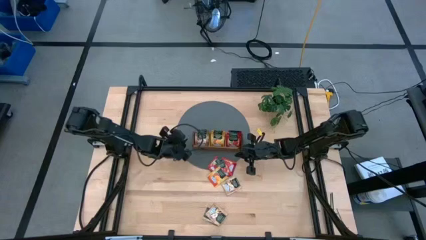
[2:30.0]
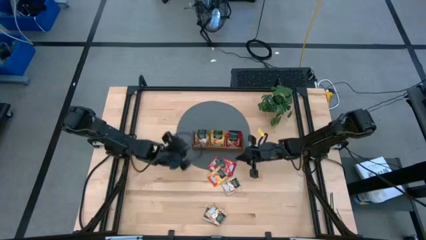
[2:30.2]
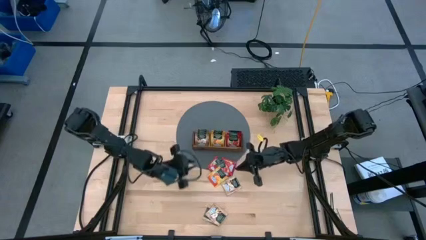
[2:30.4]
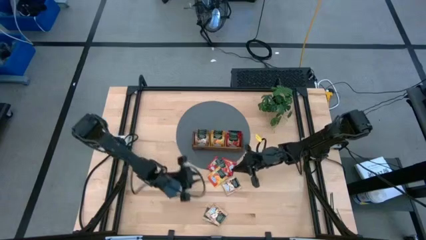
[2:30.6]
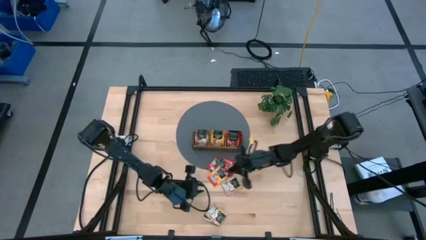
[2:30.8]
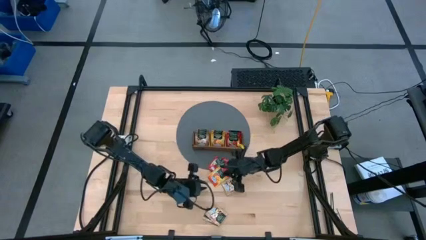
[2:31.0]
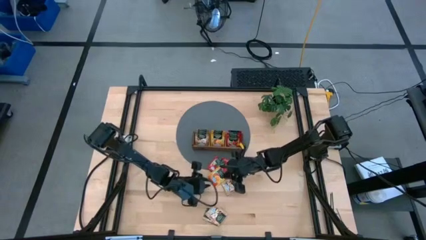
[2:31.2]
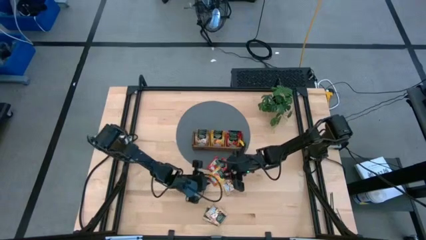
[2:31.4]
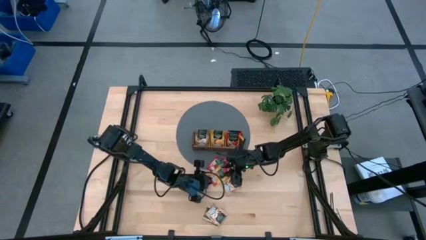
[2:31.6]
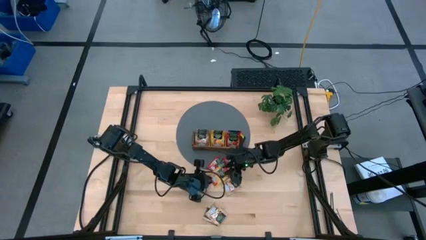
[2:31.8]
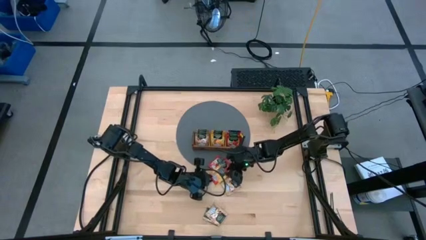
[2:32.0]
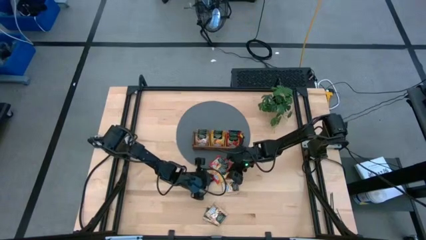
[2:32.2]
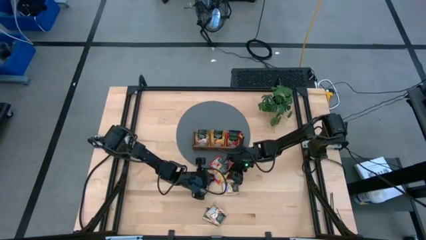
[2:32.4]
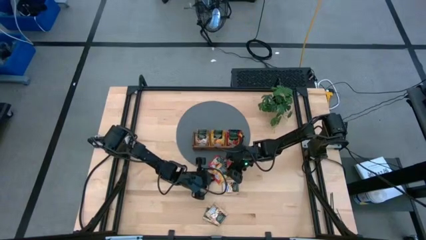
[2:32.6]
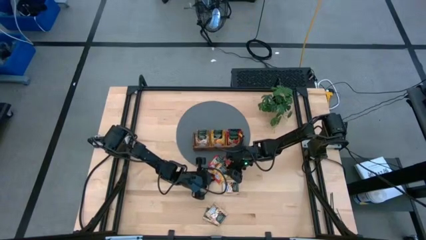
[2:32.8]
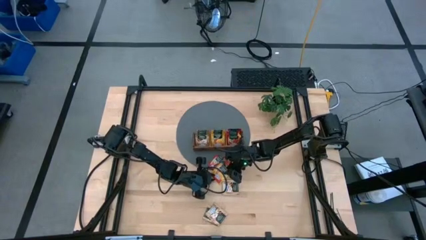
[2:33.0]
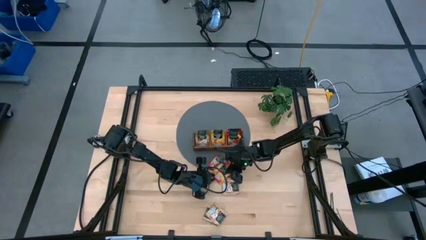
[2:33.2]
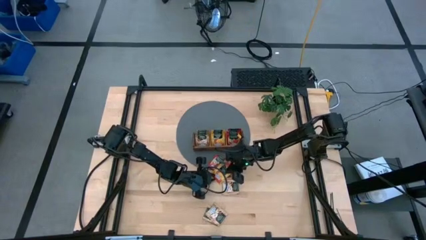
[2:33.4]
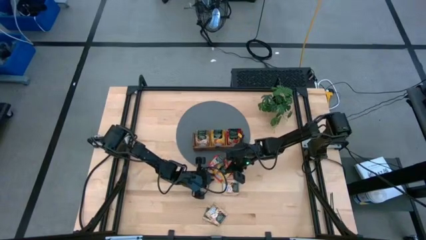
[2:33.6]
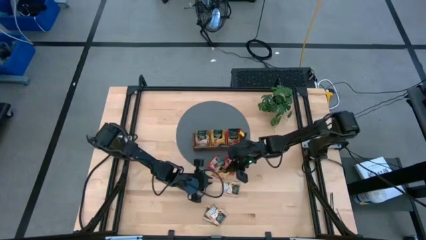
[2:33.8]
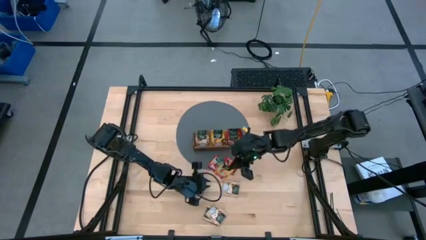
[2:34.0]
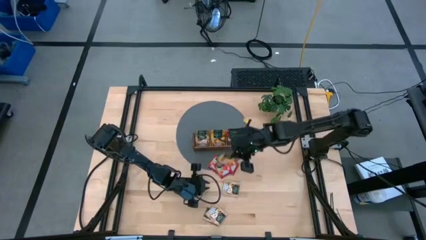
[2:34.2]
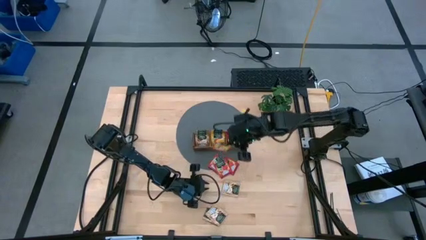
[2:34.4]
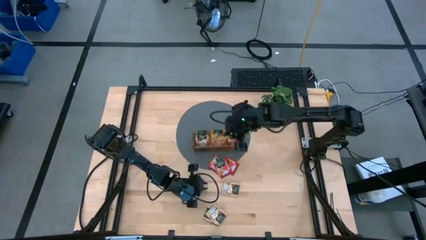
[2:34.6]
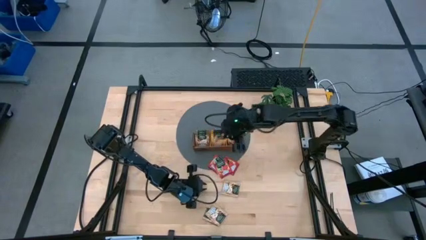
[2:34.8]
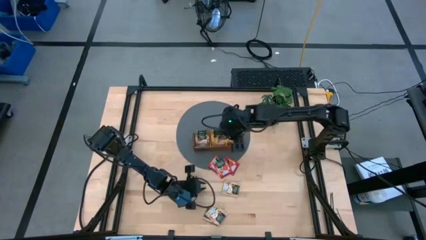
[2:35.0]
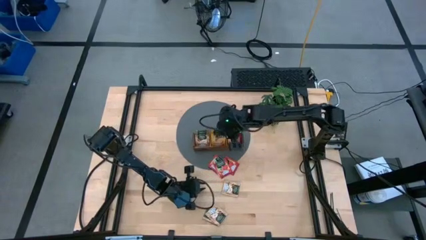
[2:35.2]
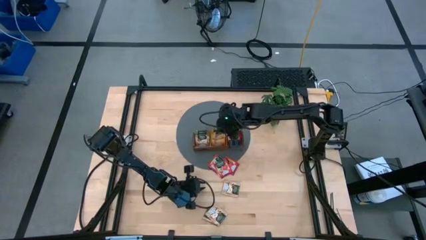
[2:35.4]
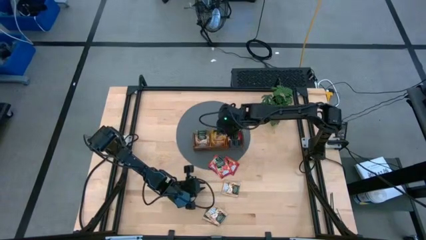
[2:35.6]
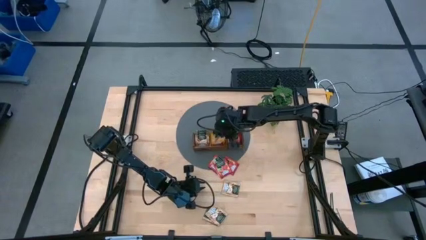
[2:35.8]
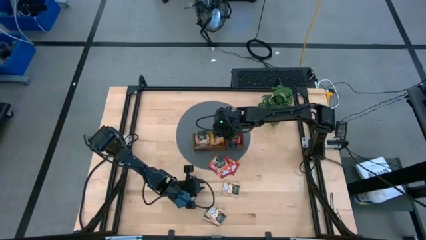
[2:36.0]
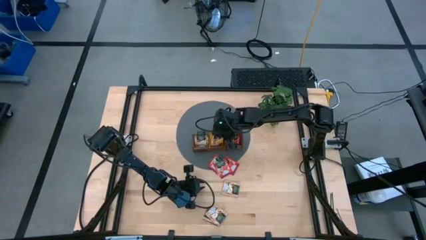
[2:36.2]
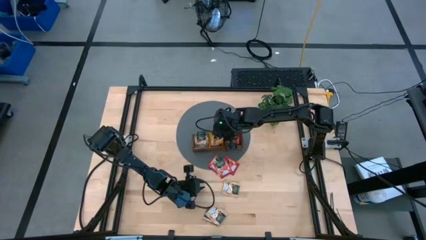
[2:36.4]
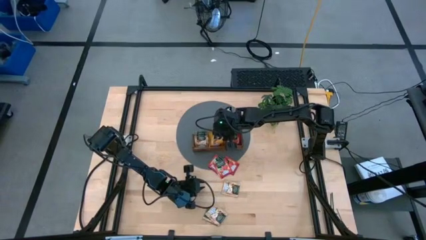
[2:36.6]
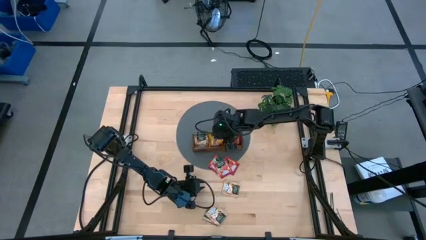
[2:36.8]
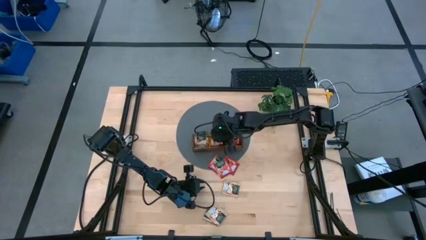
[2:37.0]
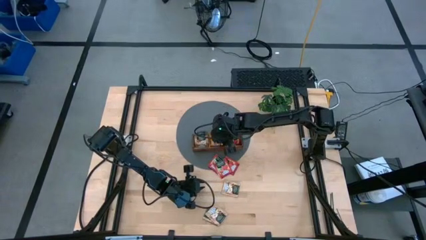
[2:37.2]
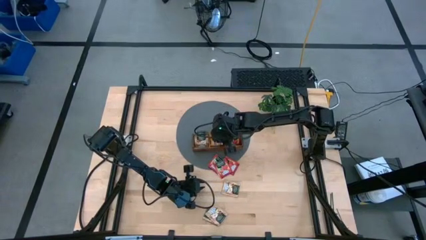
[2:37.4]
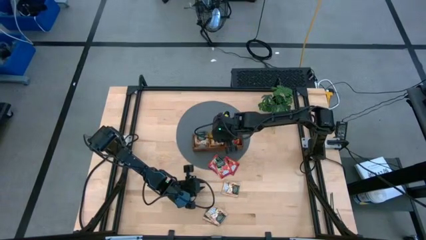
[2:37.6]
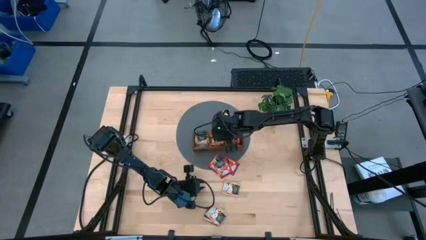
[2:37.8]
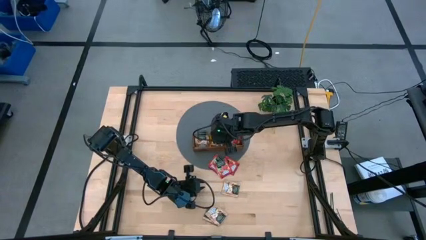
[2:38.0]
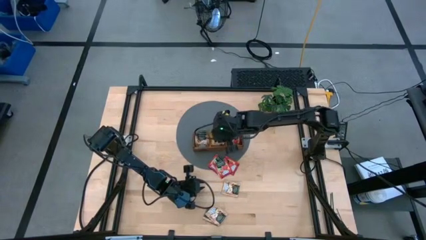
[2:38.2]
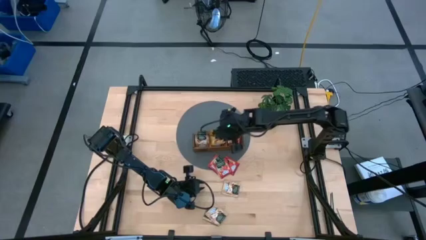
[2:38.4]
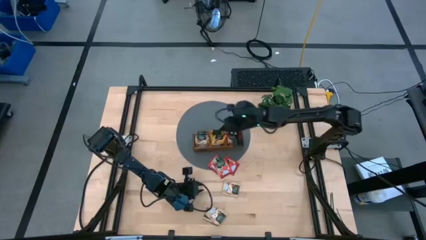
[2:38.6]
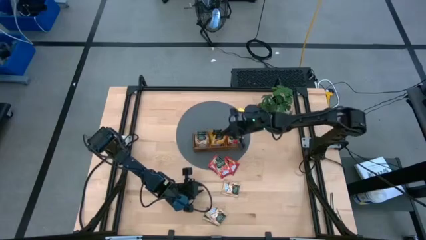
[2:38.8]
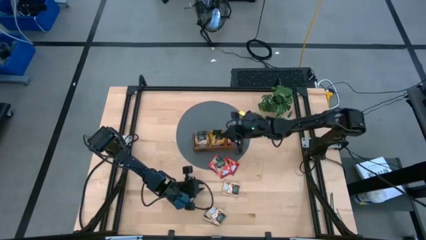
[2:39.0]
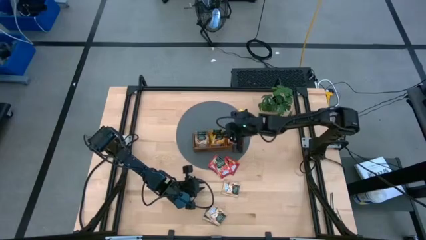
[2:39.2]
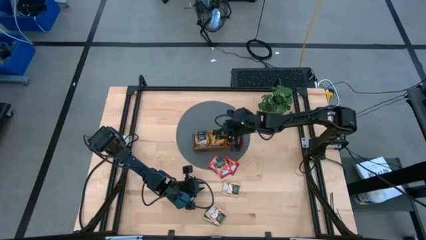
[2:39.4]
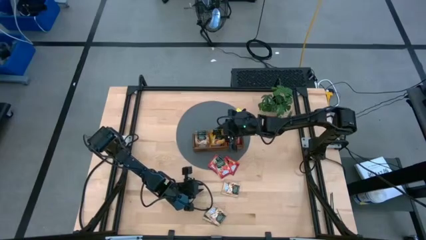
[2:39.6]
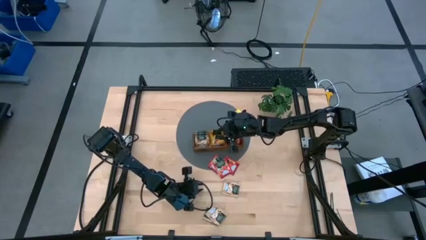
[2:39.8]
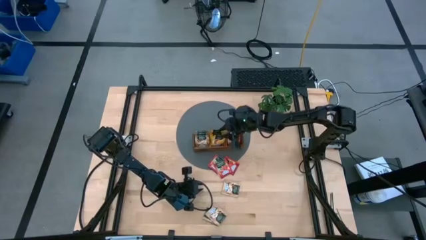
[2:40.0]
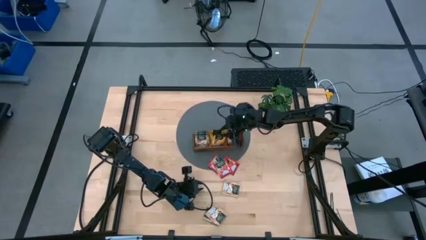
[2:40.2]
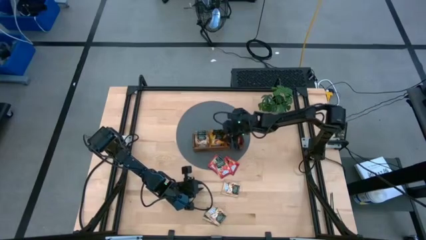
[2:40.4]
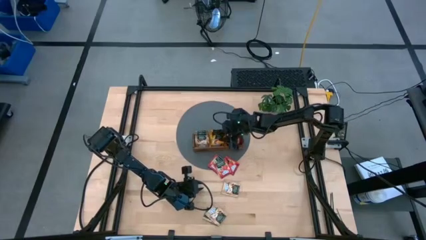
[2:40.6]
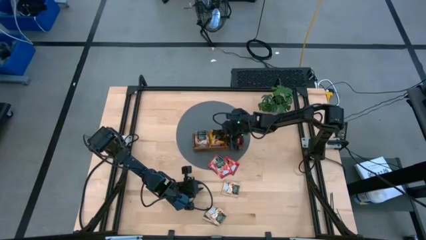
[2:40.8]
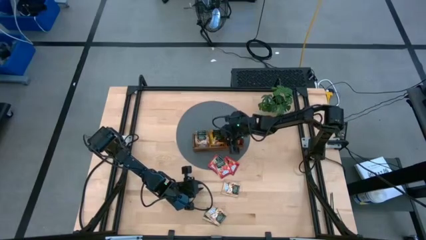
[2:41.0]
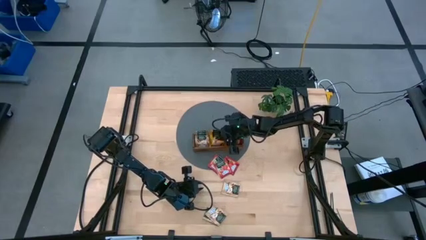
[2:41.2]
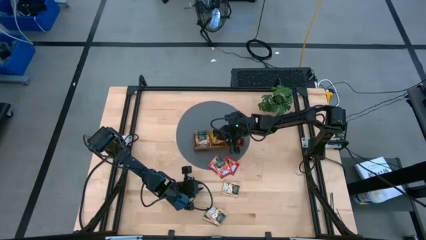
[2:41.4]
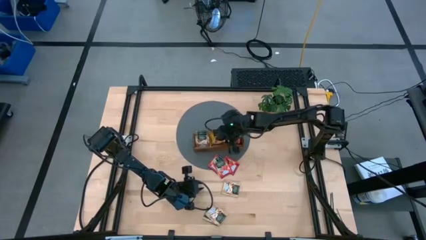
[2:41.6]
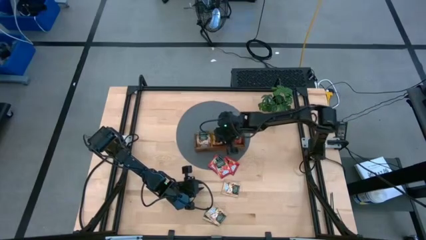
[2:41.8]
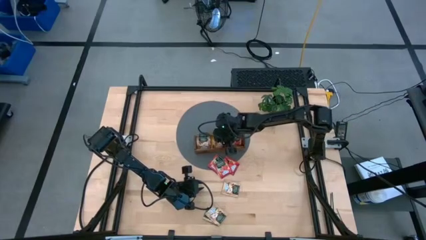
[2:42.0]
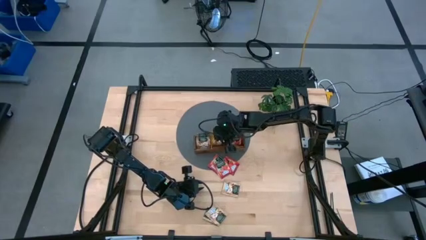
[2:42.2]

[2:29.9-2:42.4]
Task: Pick & Place Tea
Put the yellow tea bag into the middle section of the wooden organizer
